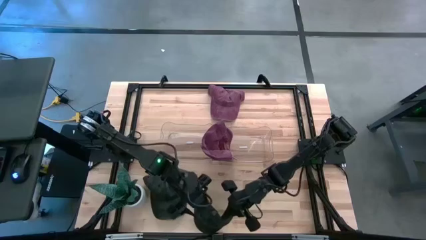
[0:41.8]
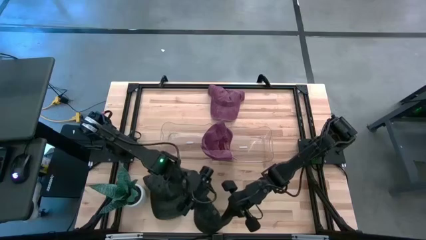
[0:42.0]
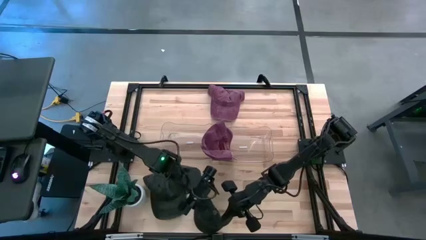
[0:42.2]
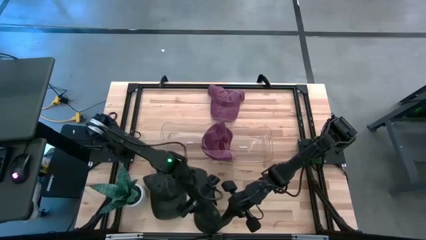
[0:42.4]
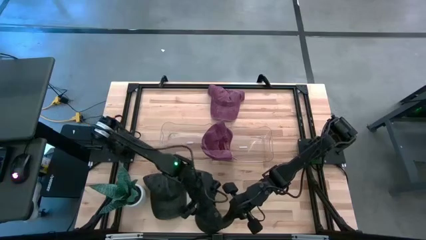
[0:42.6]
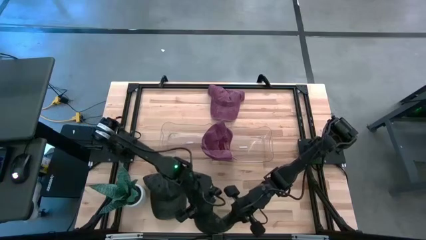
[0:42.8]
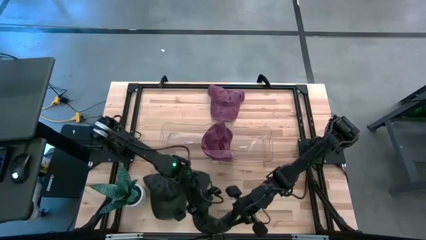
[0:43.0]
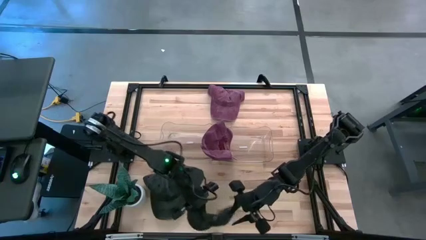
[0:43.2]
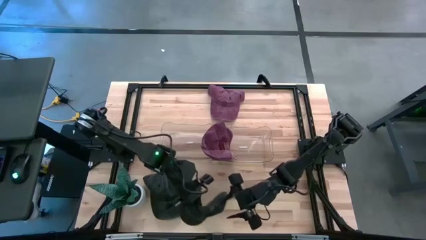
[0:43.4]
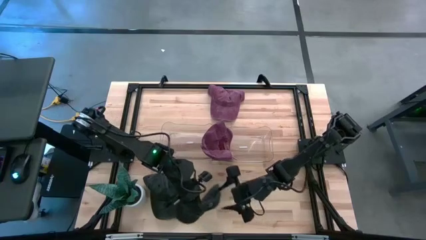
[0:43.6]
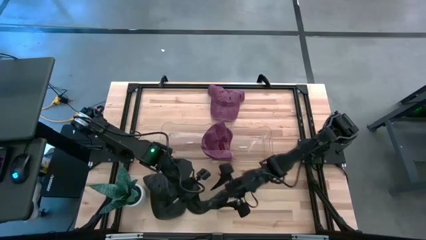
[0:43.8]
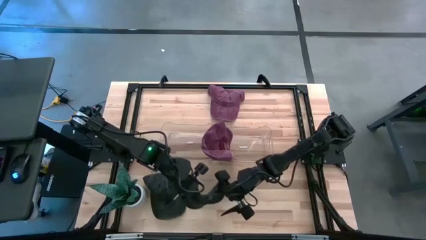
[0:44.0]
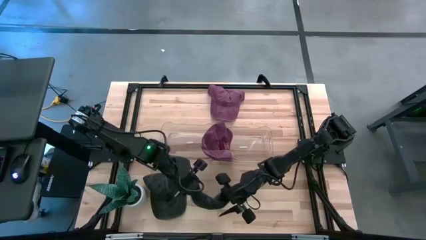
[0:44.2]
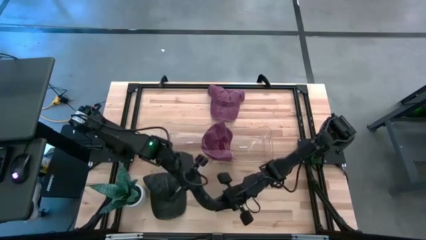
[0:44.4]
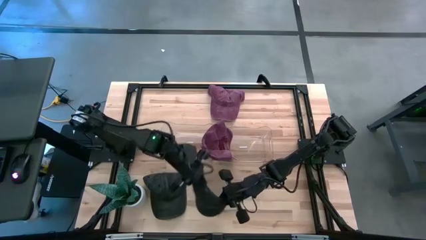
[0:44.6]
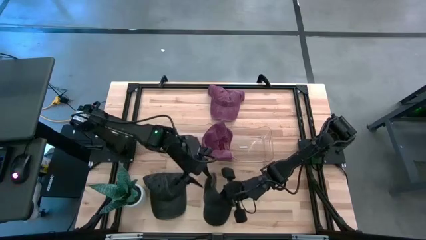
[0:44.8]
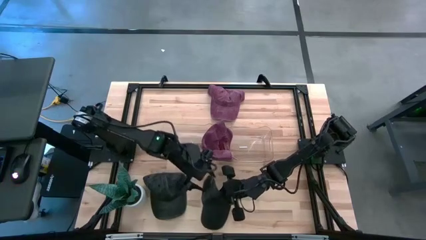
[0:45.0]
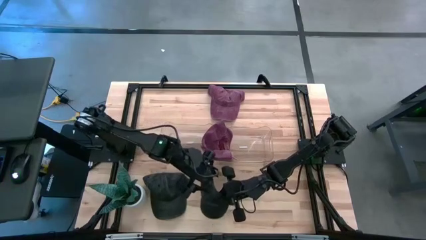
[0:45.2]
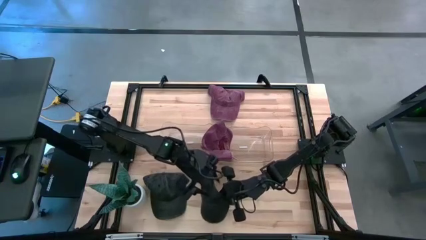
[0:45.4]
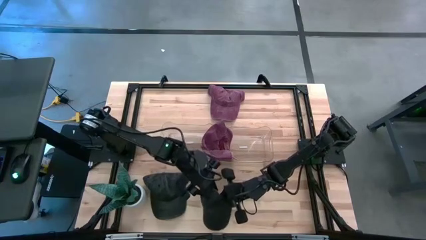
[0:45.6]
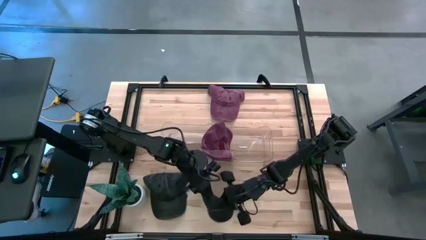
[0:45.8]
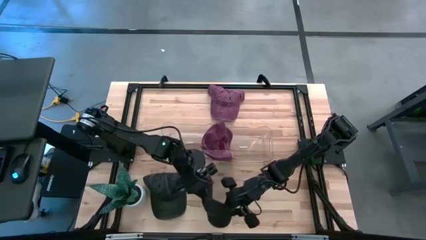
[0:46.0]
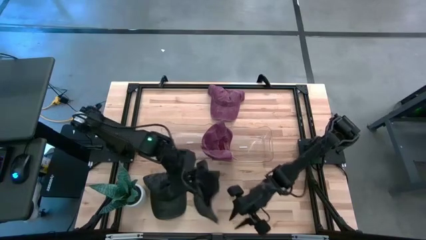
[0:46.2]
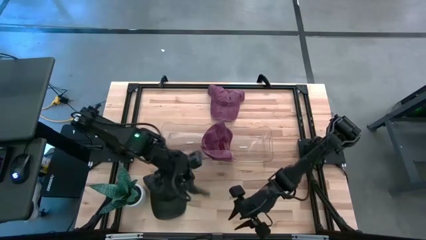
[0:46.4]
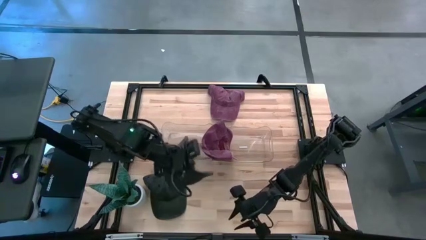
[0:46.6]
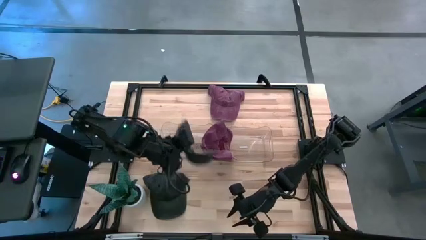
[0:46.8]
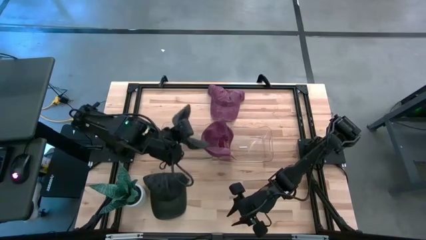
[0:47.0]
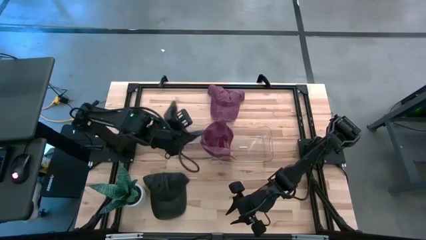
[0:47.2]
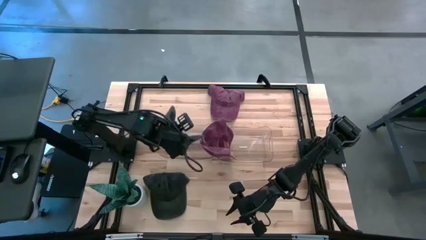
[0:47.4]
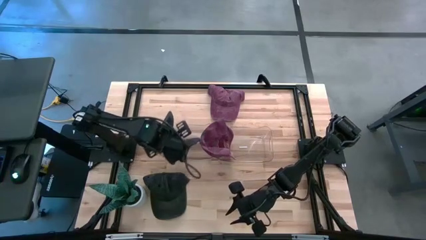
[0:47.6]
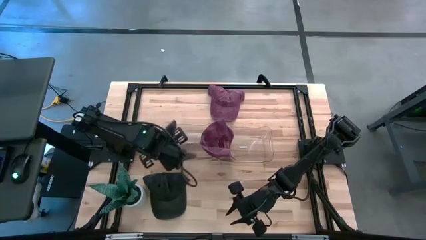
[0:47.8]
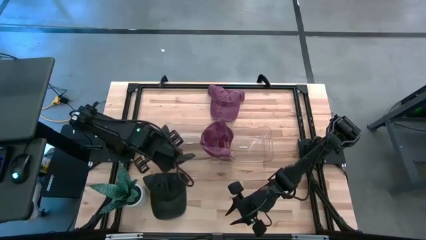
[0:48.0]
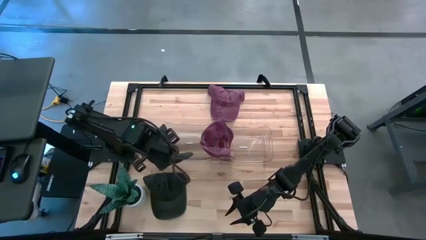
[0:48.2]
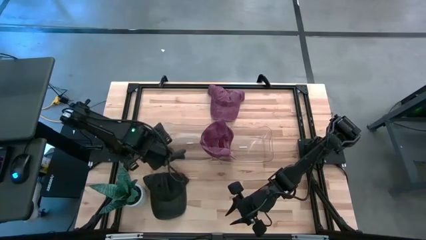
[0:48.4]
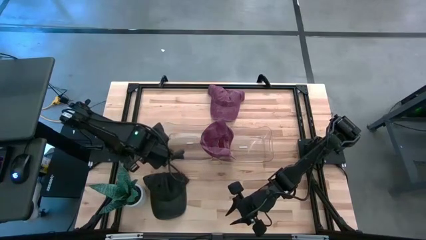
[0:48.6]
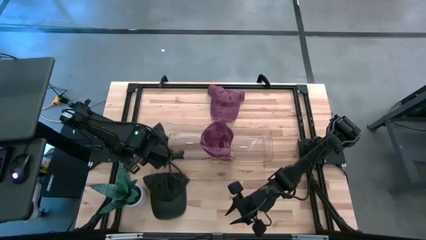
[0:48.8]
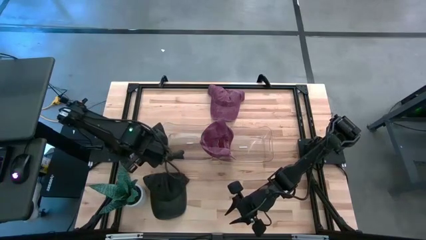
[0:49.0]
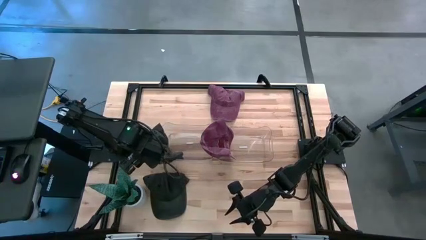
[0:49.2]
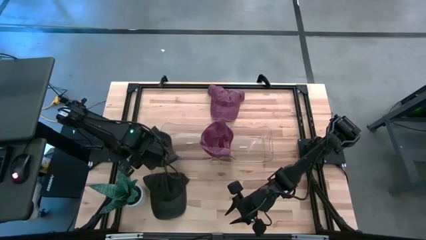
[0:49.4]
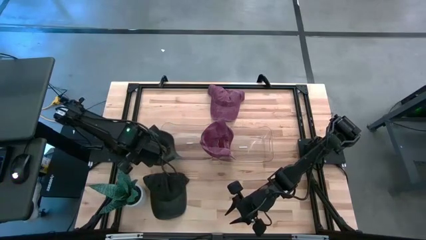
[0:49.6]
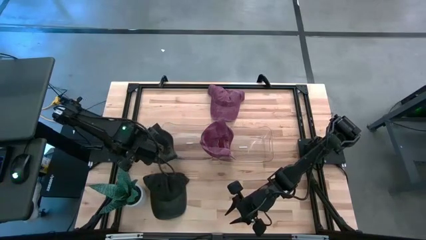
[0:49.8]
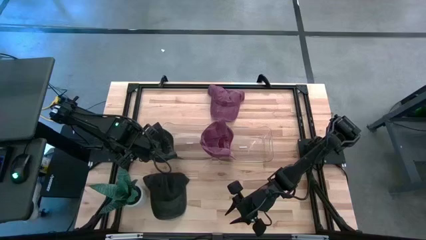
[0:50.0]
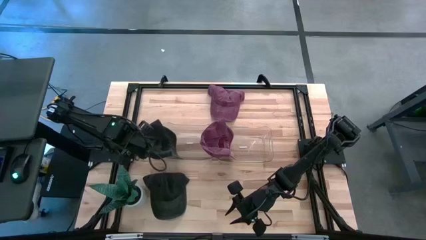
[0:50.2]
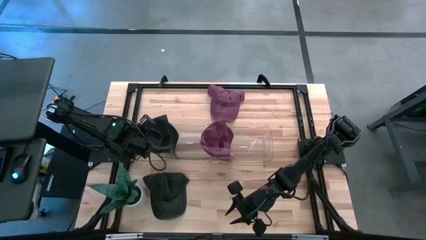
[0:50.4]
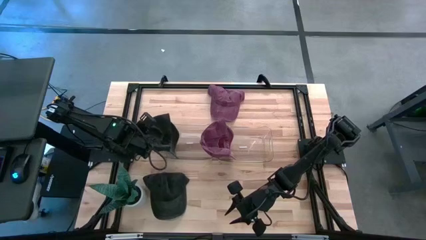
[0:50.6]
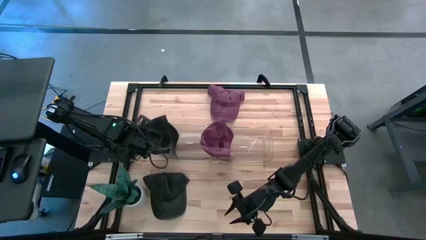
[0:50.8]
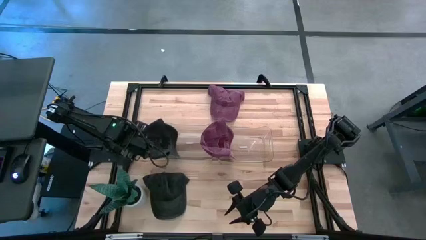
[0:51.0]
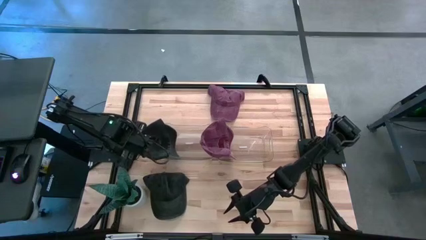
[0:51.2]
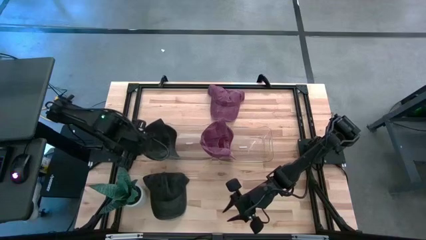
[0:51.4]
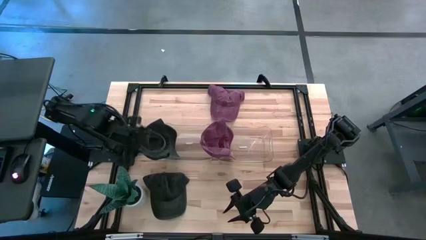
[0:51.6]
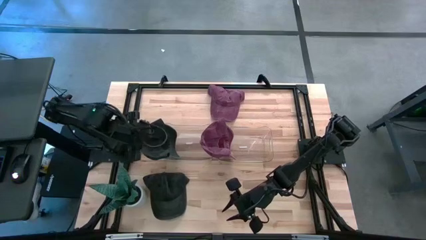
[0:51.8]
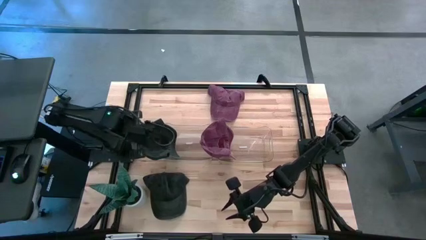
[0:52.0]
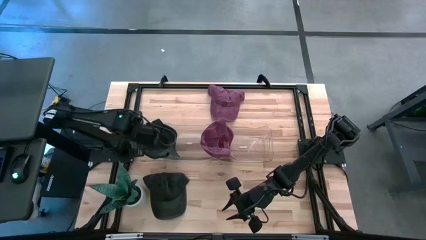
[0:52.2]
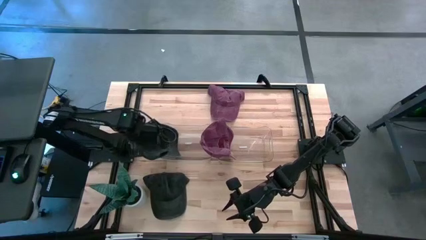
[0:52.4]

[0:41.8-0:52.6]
Task: Pick & Place hat
Put the right black cap into the left transparent bin
